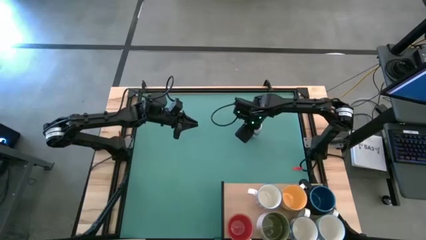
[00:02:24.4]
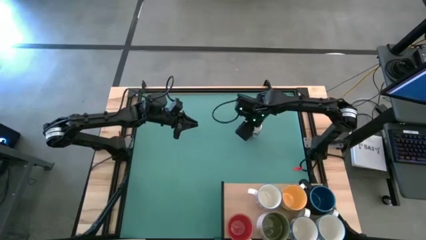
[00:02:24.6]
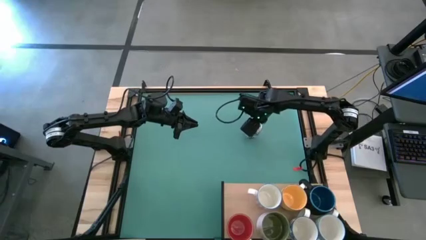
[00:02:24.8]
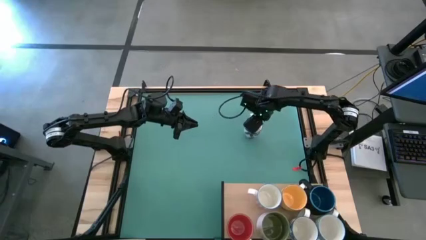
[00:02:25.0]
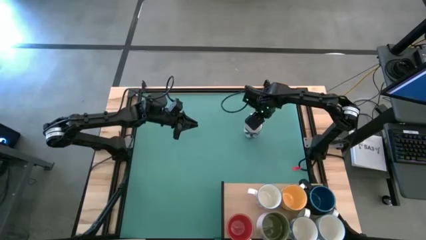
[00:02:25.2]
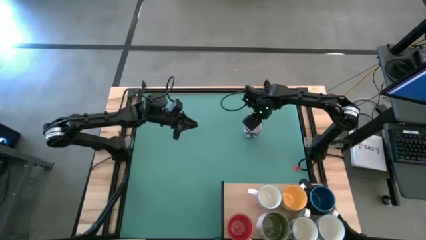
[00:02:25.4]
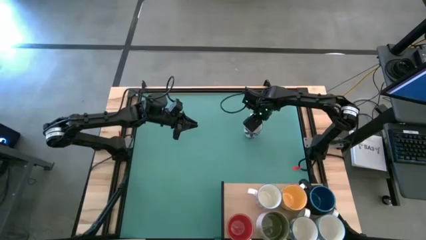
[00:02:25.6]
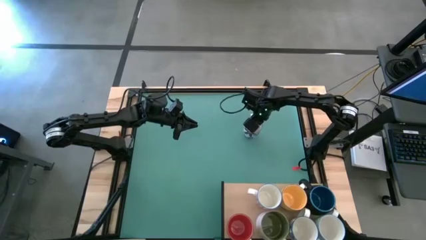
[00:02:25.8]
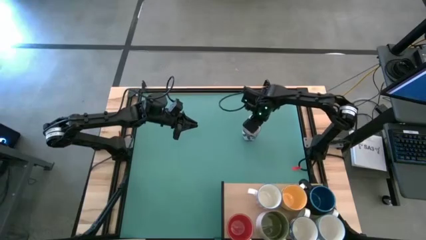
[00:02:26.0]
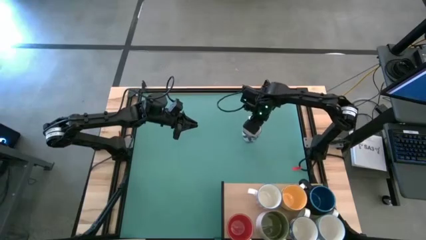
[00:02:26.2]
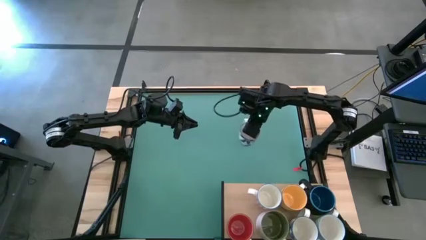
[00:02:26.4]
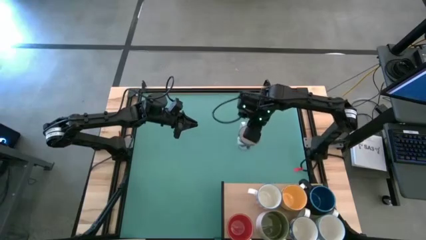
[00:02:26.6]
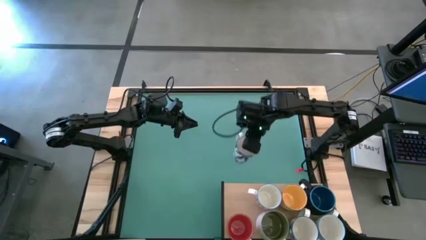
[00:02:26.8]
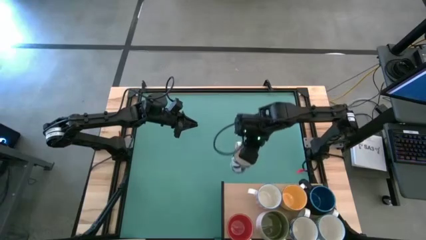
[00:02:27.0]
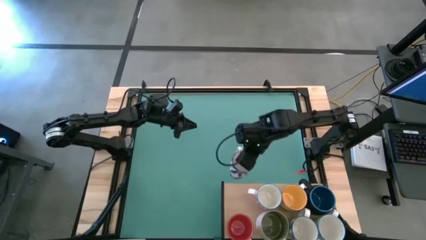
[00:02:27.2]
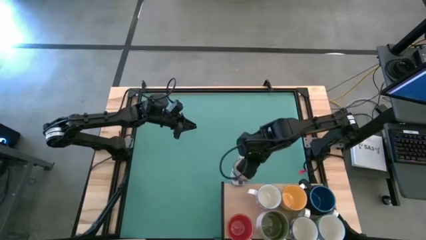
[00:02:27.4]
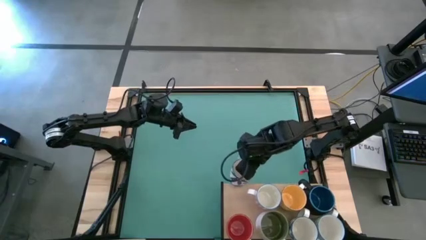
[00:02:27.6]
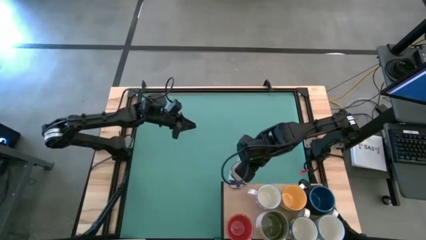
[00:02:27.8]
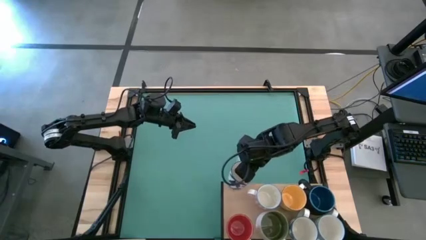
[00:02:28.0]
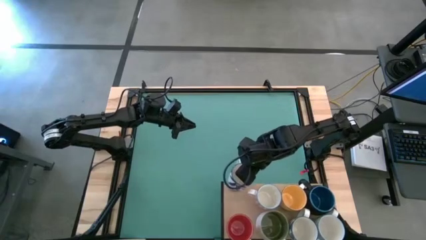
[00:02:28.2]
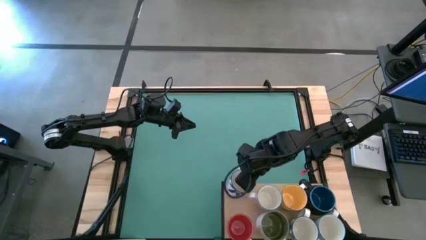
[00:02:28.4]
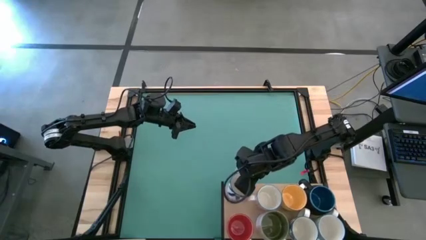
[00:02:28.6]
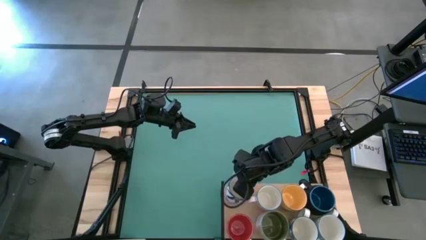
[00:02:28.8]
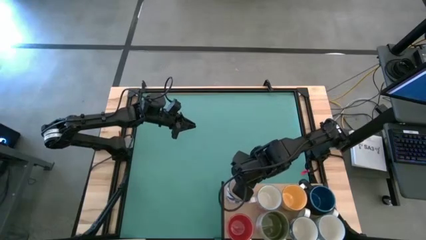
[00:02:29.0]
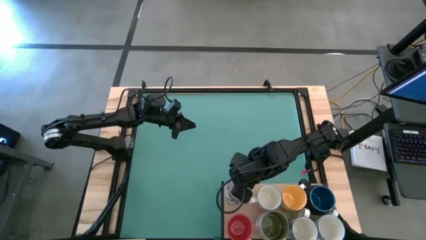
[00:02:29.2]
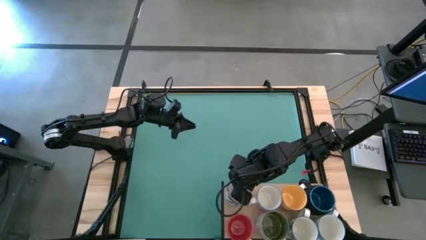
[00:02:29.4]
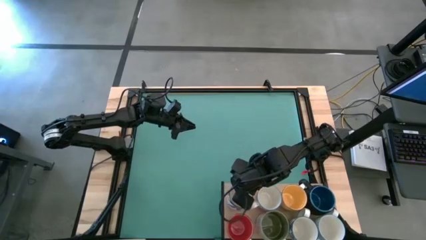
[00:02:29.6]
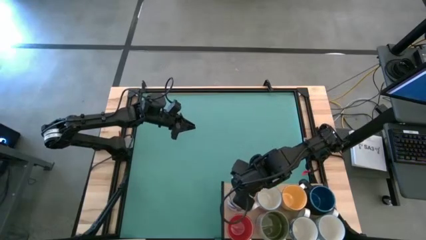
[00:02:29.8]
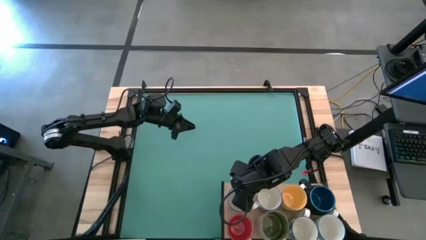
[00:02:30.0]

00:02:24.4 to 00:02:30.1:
Task: Place coffee mugs
Put the blue mug on the shelf

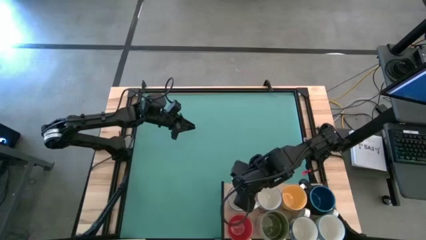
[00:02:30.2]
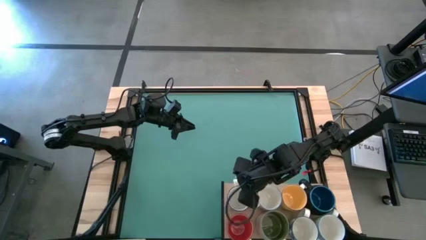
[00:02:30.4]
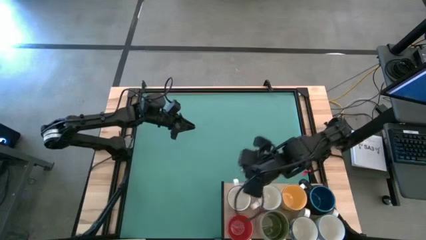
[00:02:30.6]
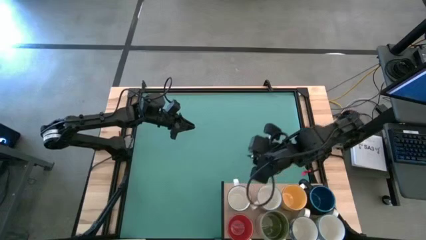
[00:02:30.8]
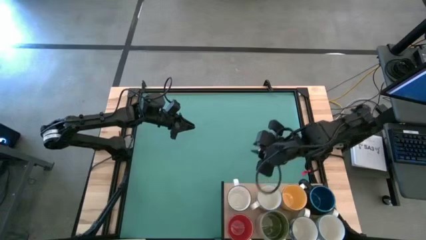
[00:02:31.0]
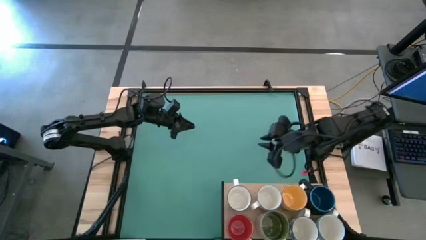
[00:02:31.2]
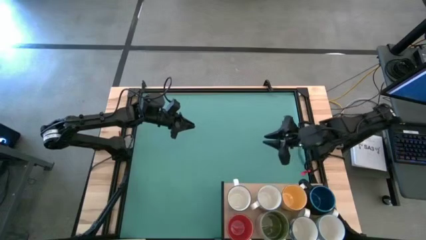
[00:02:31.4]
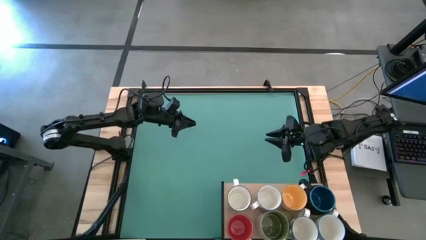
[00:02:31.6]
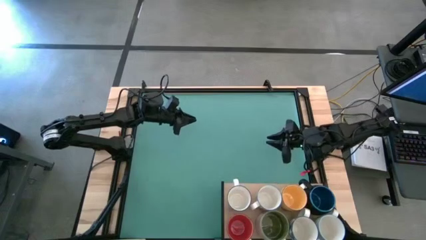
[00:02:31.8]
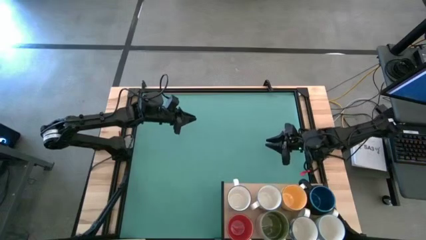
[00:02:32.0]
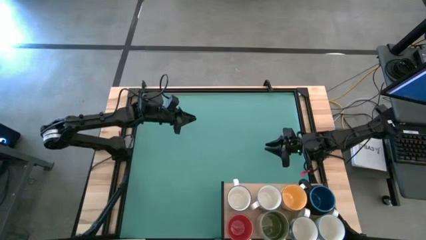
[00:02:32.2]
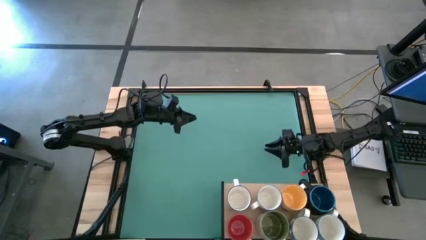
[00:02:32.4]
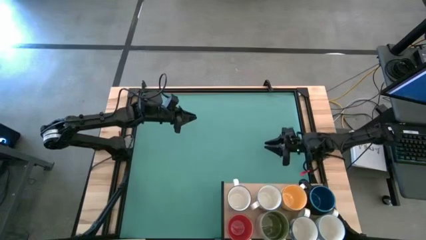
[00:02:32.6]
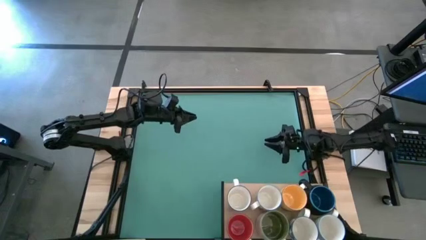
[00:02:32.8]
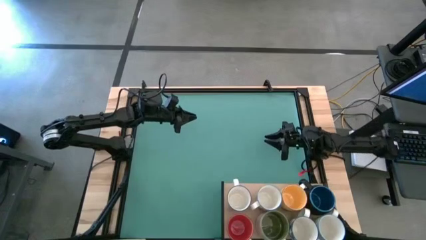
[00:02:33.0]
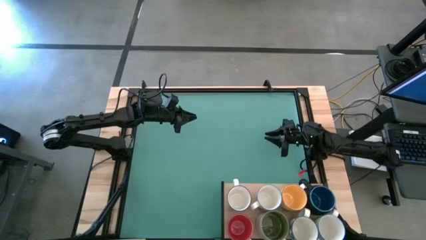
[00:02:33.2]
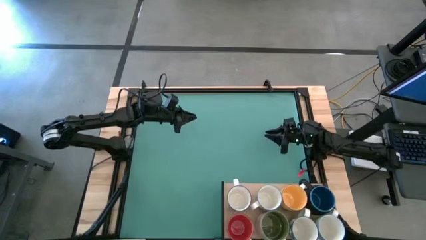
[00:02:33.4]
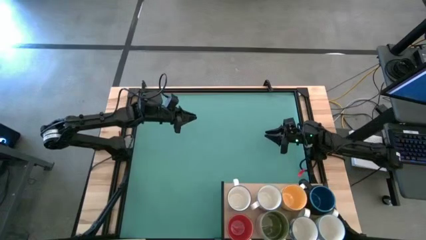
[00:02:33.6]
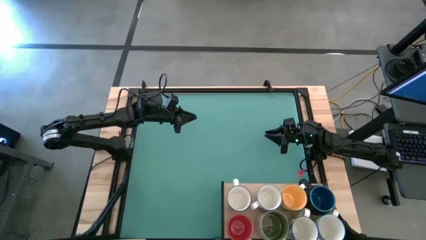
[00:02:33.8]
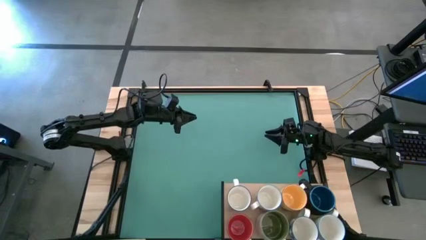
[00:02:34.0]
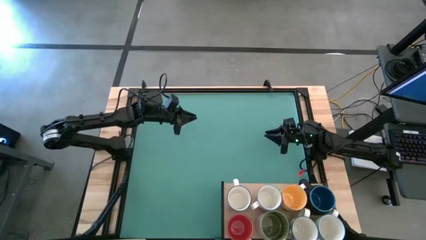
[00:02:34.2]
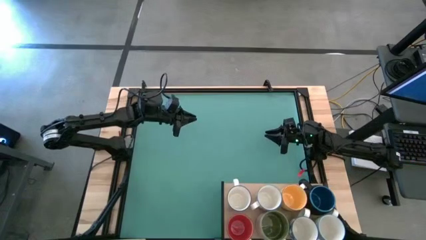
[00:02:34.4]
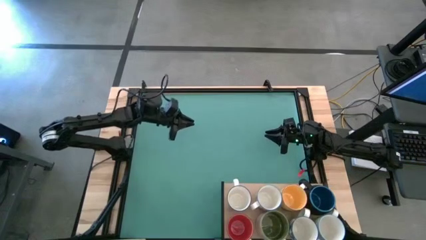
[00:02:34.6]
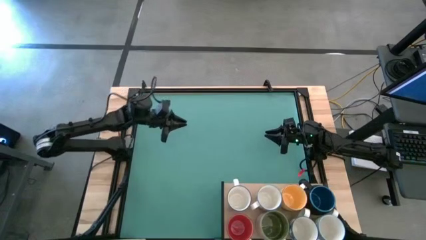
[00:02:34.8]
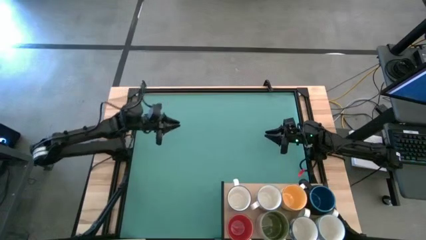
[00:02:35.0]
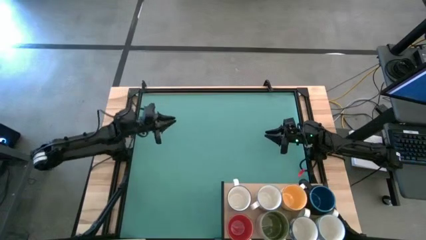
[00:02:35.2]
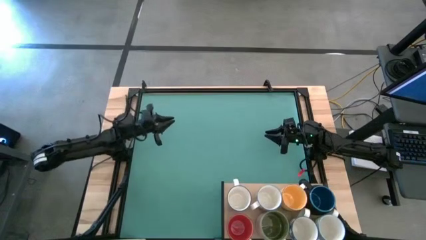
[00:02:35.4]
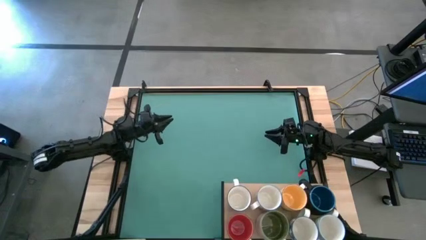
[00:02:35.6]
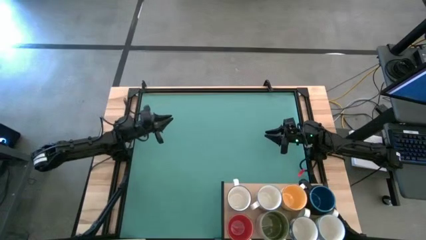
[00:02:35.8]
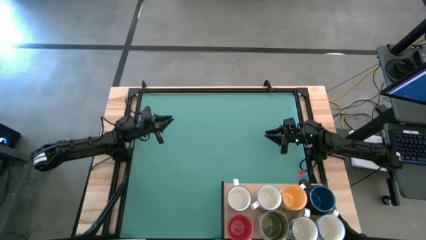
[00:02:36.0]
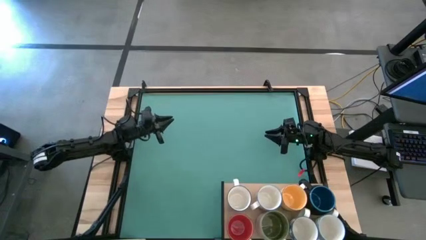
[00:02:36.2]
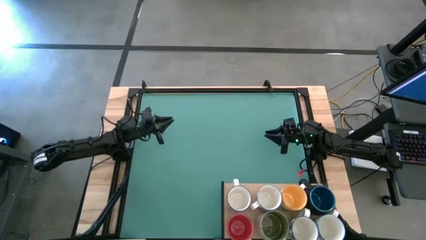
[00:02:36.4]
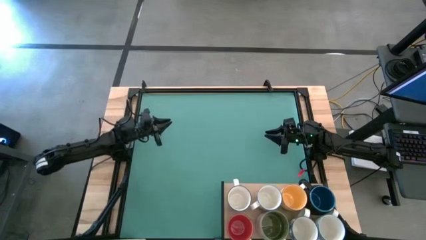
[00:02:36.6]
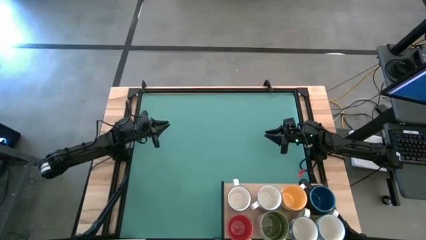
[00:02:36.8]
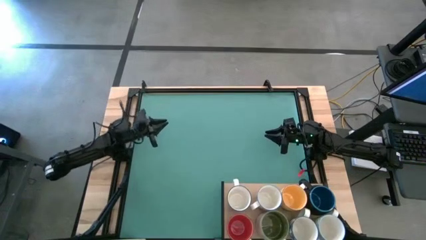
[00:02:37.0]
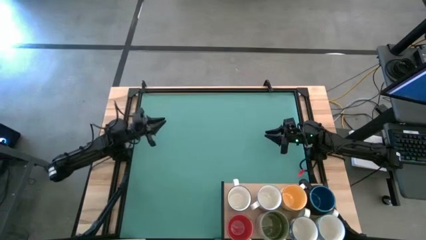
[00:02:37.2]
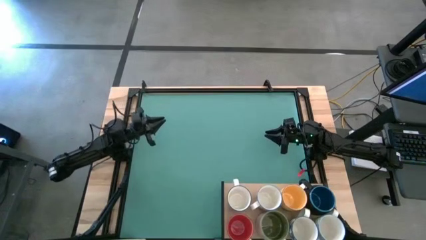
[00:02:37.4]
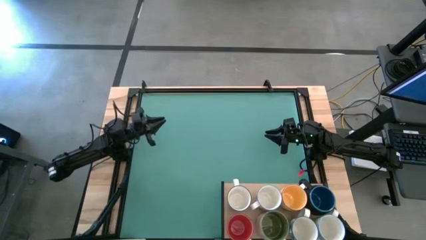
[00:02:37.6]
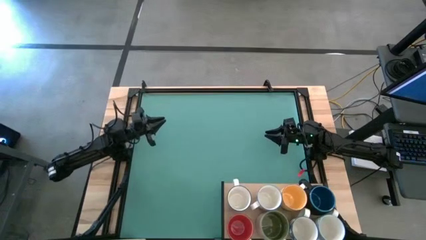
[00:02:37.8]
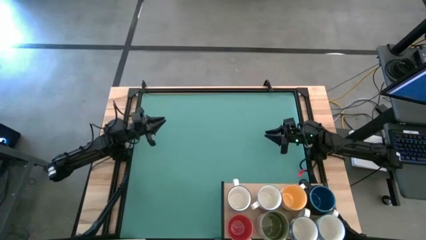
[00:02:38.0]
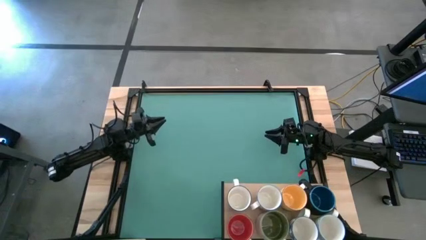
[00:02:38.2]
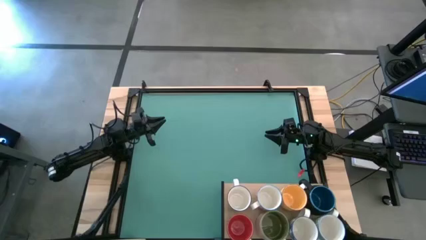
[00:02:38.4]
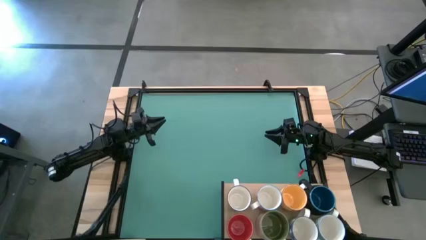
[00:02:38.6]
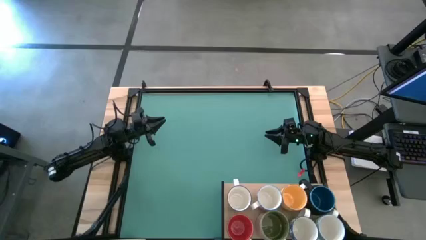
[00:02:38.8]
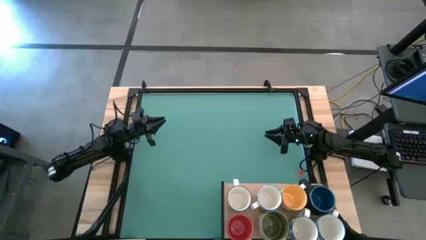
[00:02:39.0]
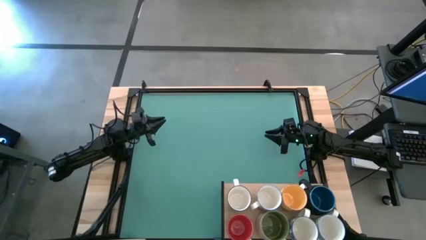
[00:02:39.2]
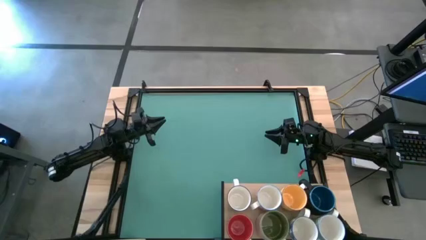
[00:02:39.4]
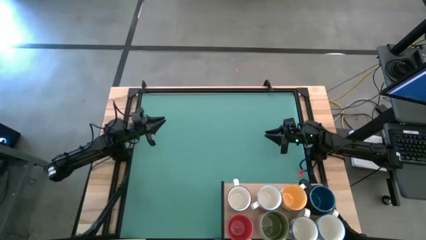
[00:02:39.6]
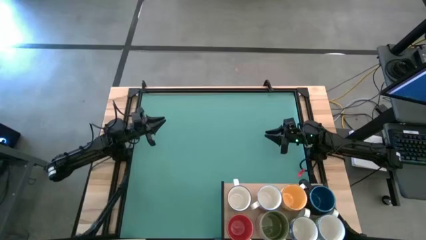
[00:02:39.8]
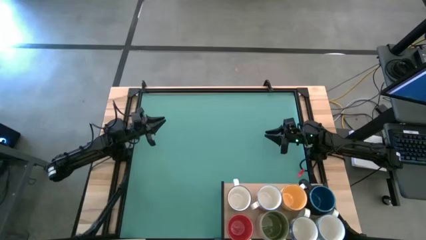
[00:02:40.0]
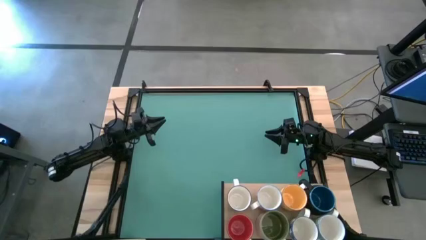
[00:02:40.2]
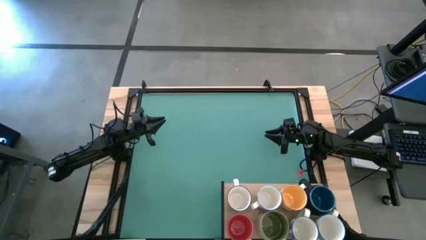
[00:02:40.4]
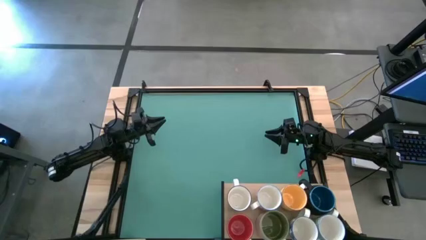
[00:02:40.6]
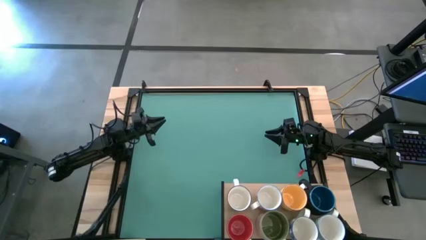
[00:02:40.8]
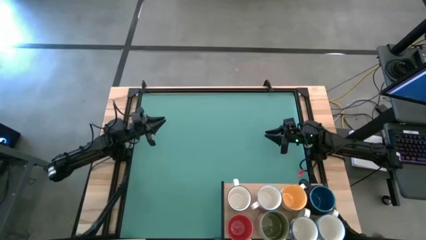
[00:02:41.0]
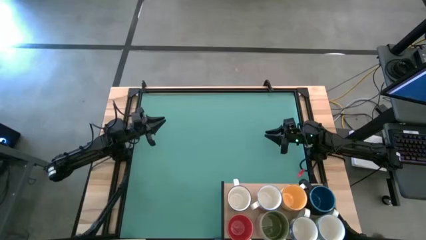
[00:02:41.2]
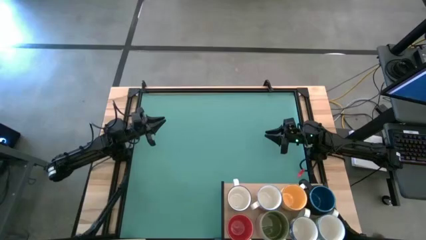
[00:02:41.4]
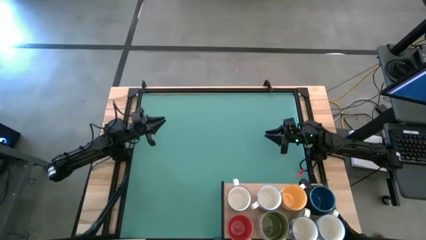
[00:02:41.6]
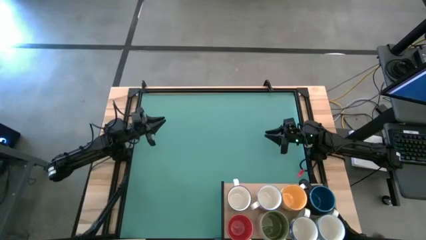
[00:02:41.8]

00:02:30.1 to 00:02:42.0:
Return to Home Position
